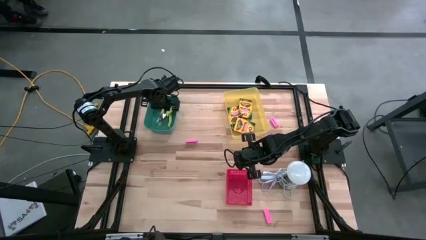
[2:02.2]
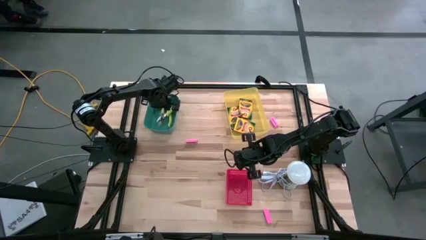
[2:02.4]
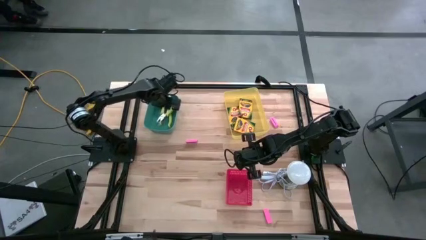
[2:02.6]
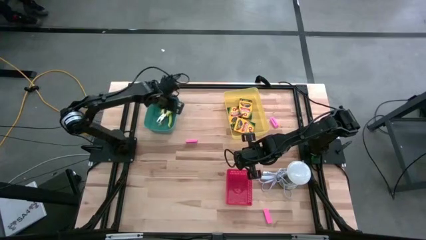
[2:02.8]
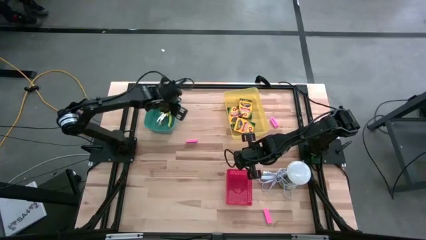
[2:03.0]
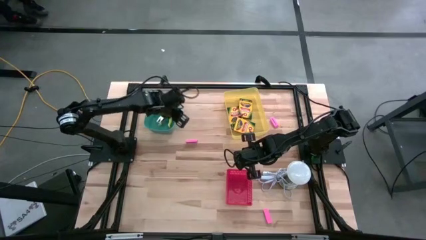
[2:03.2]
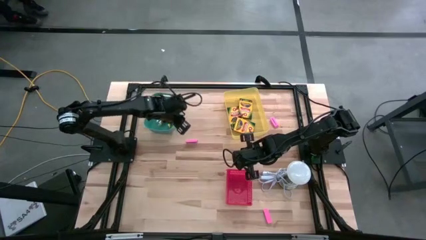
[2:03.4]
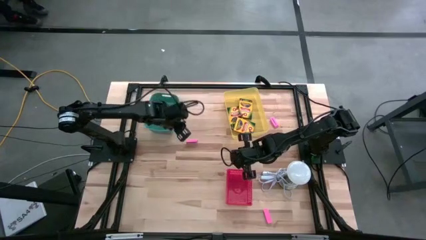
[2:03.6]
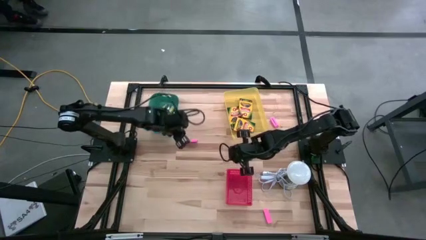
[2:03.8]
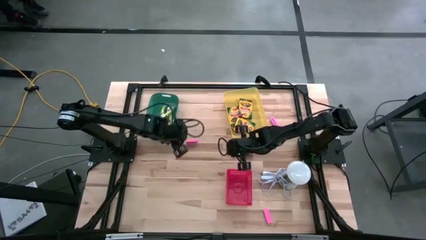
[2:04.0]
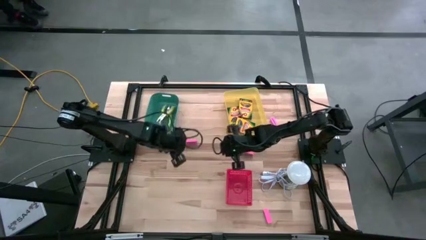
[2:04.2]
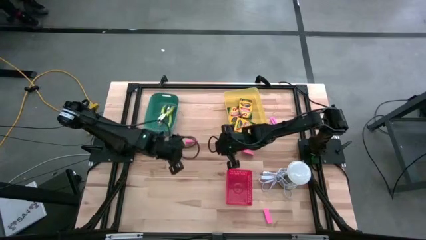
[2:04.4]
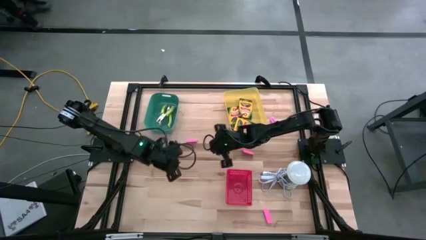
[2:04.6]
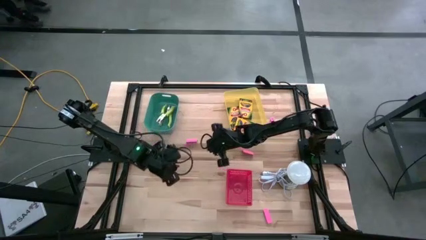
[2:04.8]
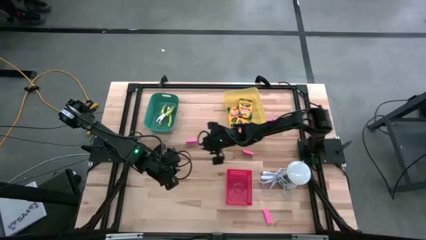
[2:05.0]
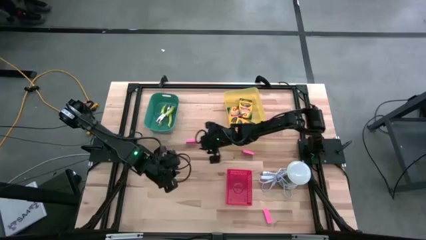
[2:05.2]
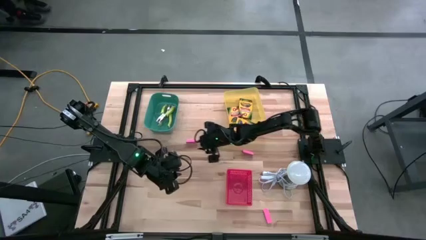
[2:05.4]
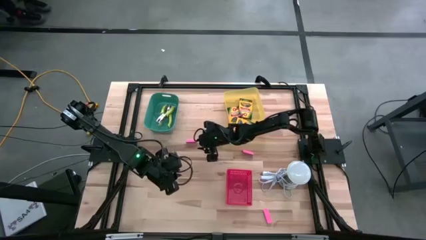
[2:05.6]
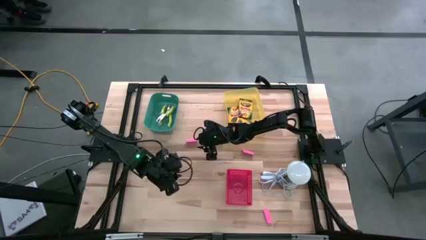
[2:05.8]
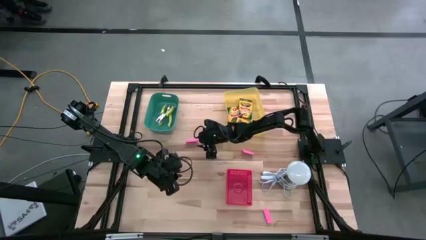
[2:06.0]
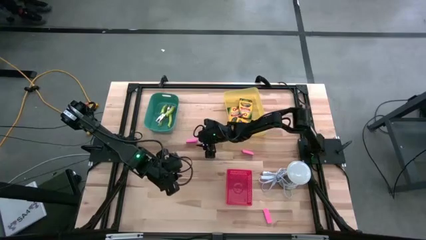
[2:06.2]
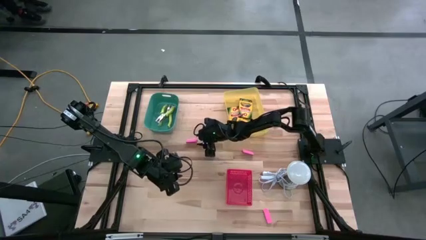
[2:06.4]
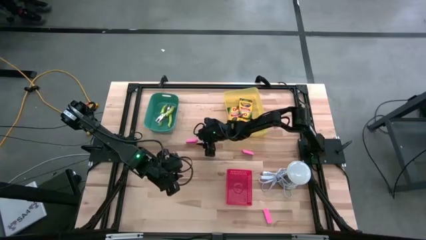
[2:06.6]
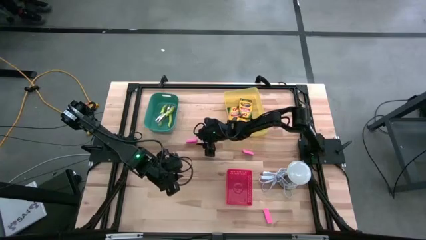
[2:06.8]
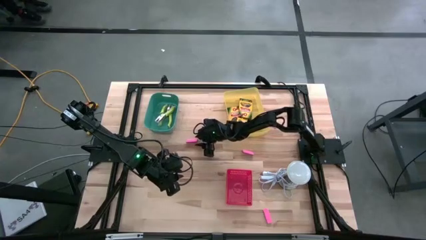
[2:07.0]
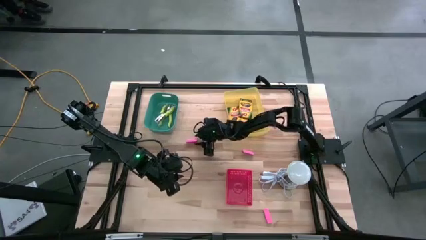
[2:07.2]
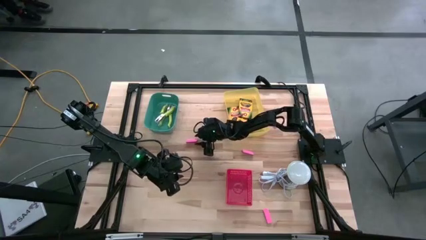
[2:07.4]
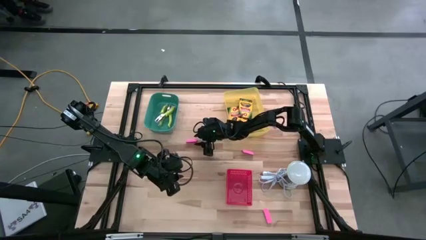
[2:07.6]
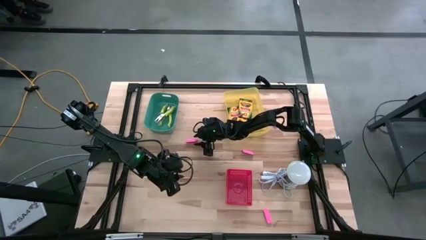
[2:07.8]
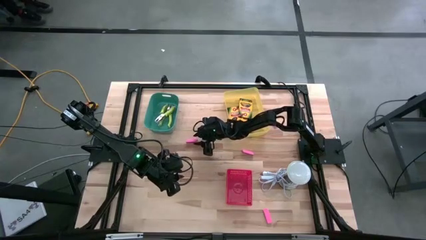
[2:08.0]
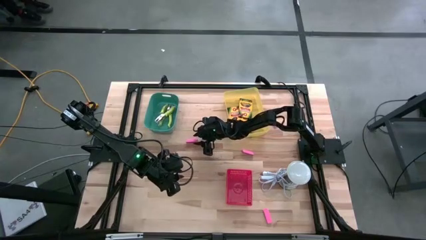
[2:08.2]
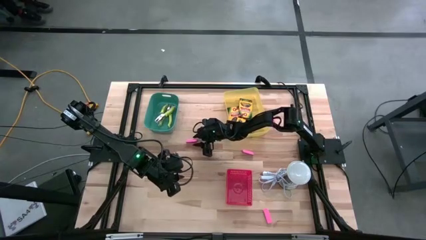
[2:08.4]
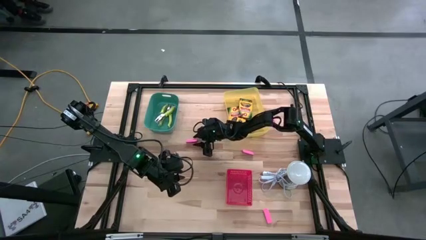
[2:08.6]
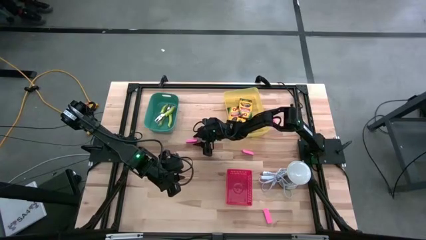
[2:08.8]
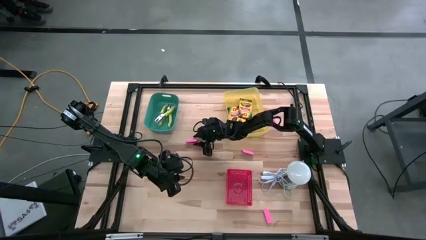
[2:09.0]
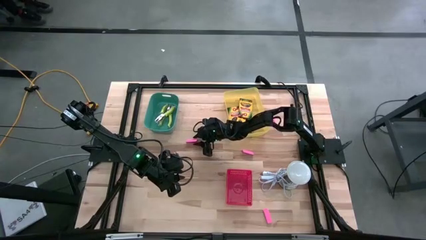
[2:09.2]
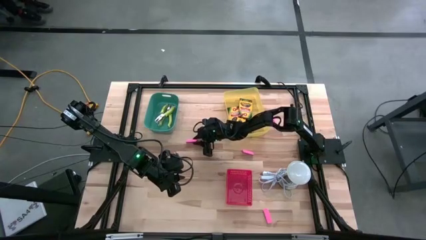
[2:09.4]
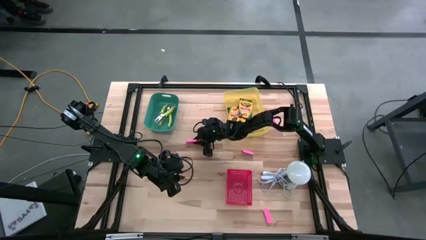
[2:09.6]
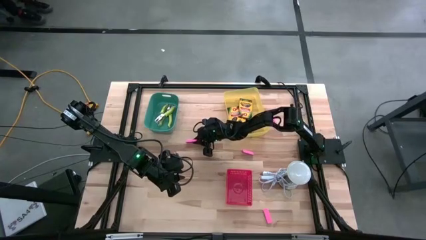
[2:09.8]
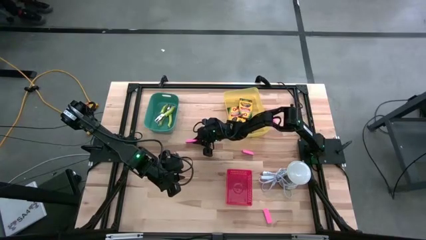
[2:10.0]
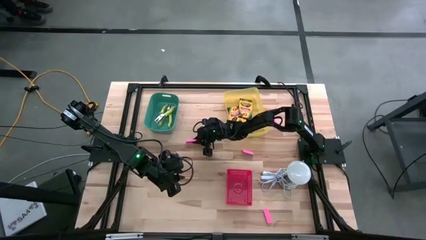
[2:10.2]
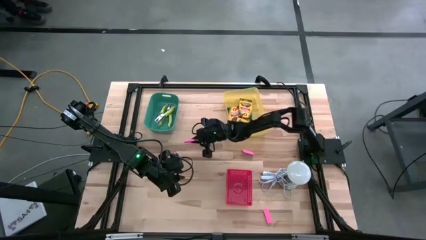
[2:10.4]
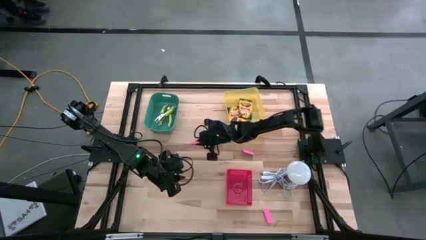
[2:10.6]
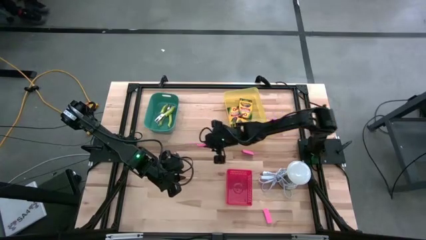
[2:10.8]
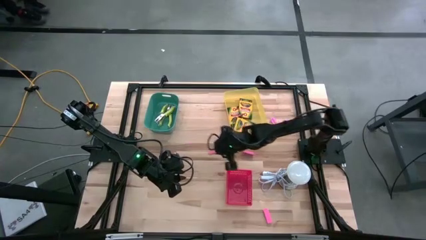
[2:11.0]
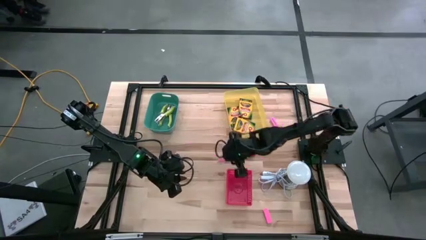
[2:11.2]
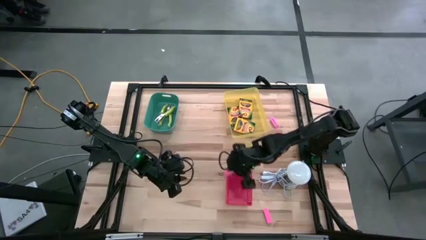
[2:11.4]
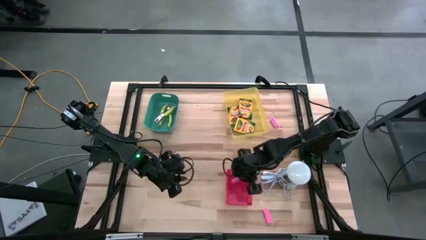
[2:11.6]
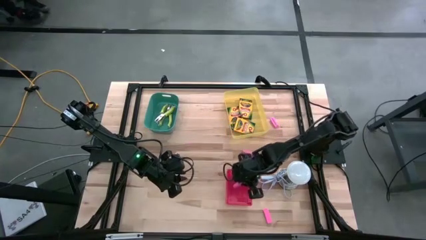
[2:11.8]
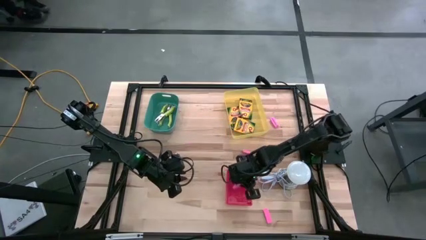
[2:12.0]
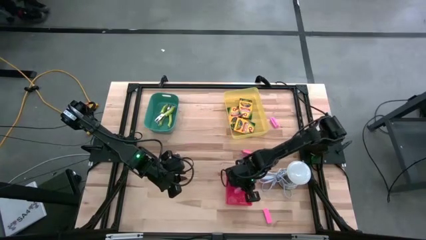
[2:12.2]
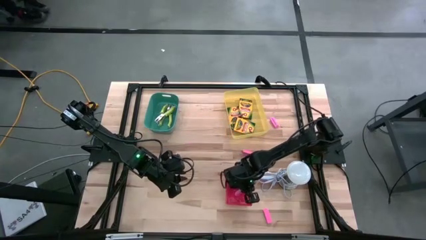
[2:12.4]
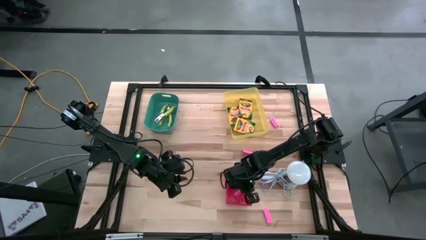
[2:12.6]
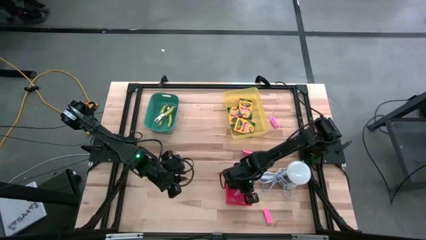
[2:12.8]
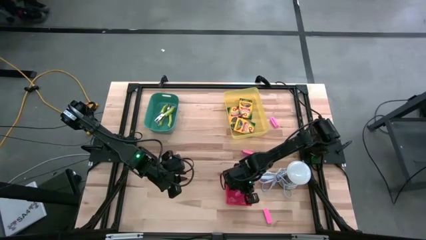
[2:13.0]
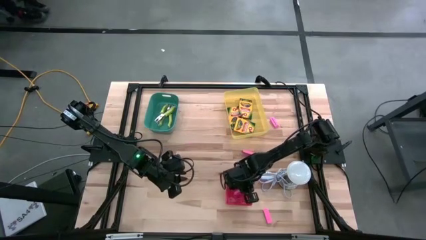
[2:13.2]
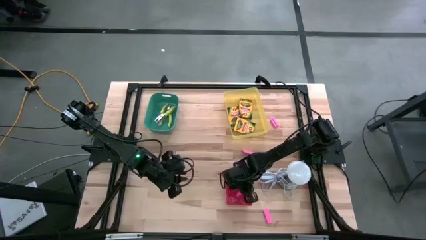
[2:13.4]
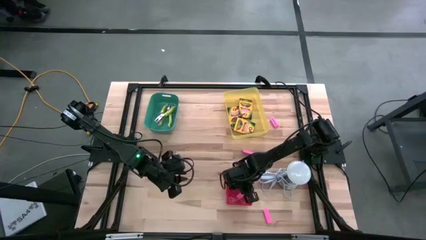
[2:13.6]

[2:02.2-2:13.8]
Task: Pick & Place School Supplies
Put the pink eraser into the red bin
